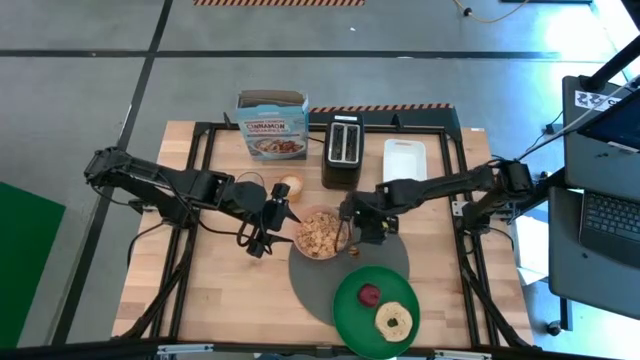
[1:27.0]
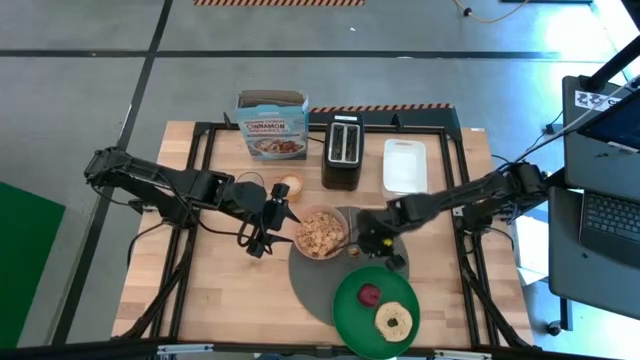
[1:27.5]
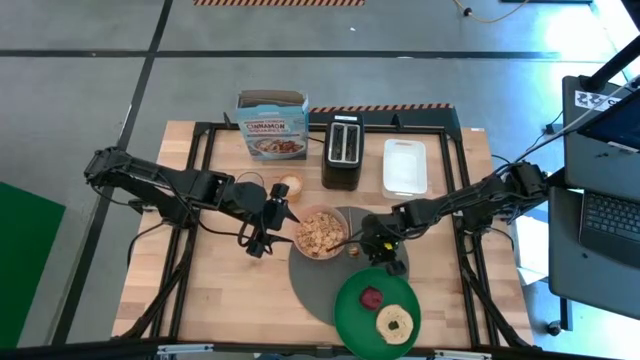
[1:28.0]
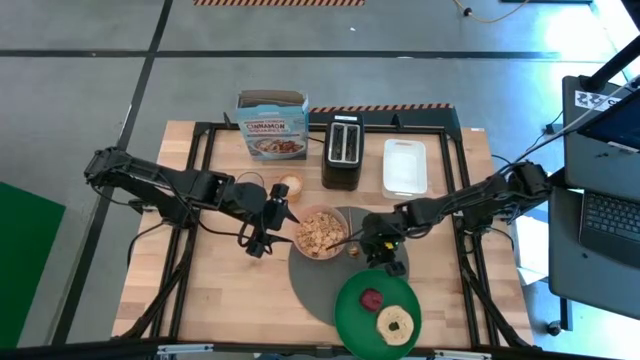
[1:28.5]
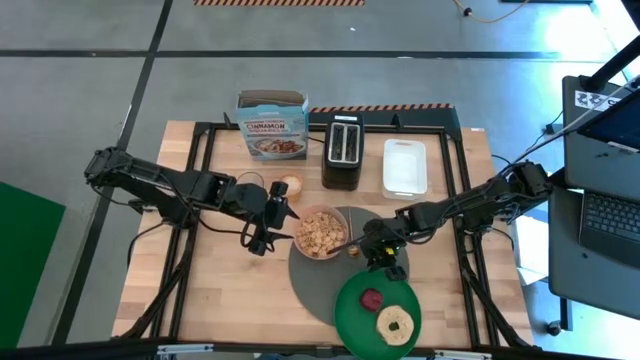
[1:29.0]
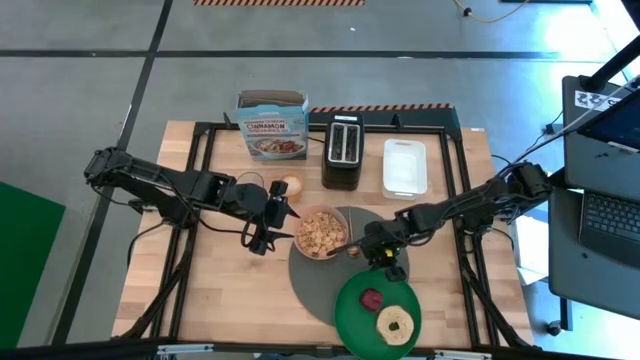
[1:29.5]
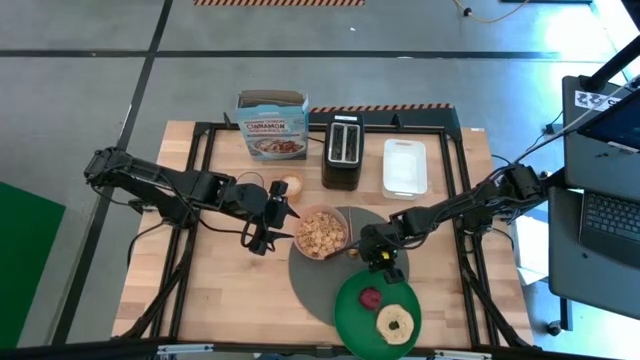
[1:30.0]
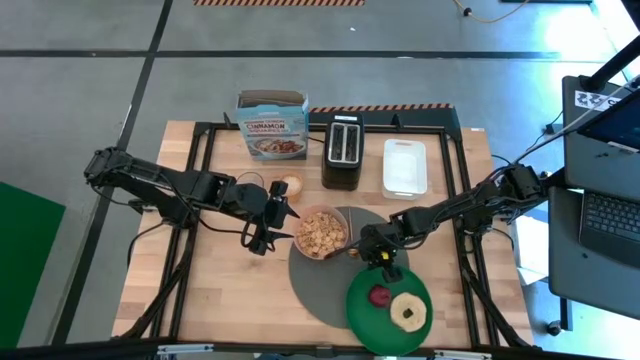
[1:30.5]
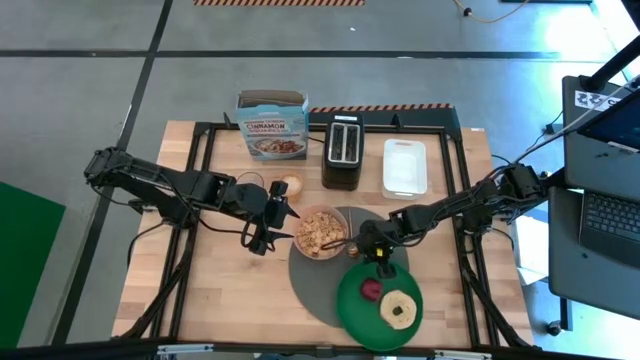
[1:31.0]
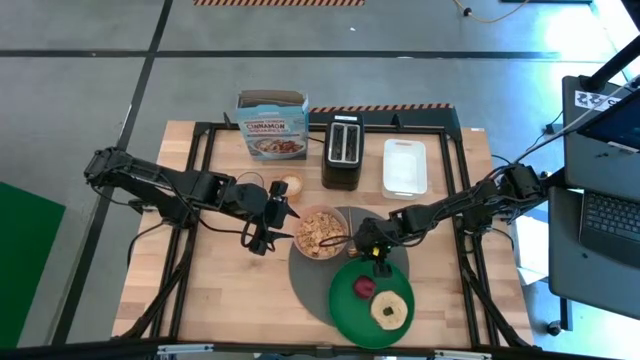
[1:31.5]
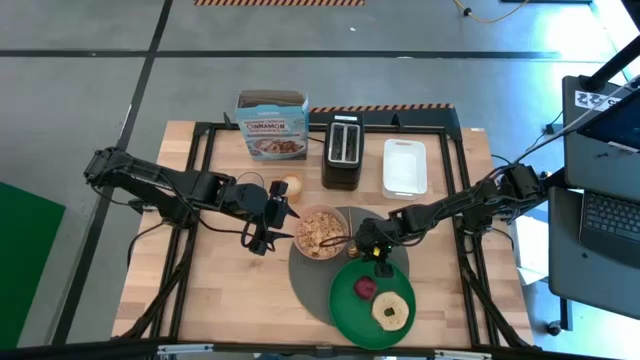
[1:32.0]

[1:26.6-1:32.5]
Task: Arrange a breakfast setting
Adjust the green plate on the gray table mat

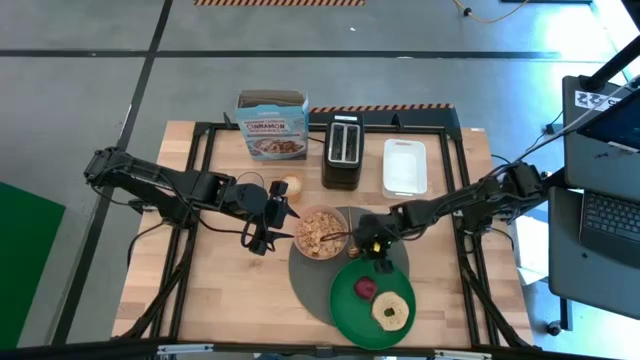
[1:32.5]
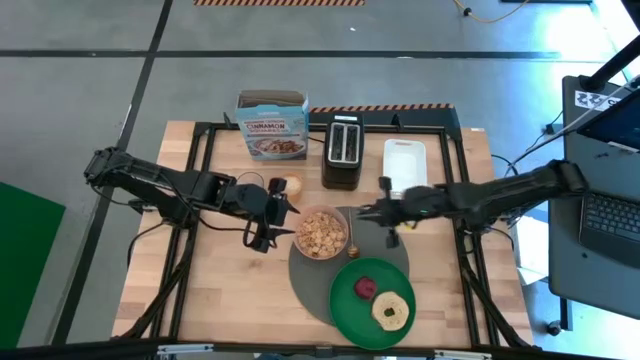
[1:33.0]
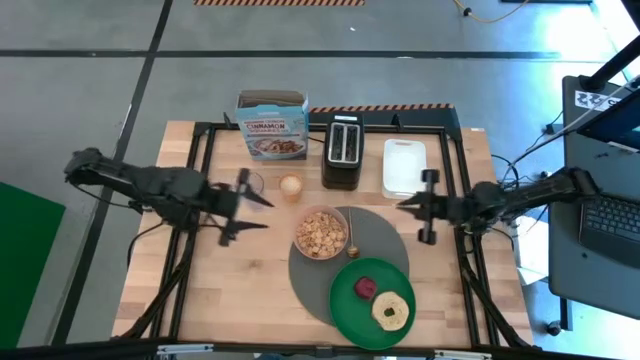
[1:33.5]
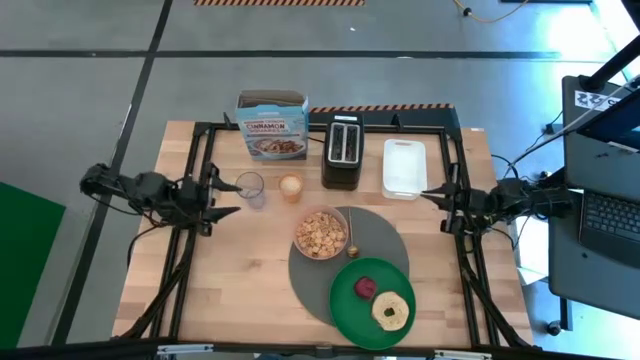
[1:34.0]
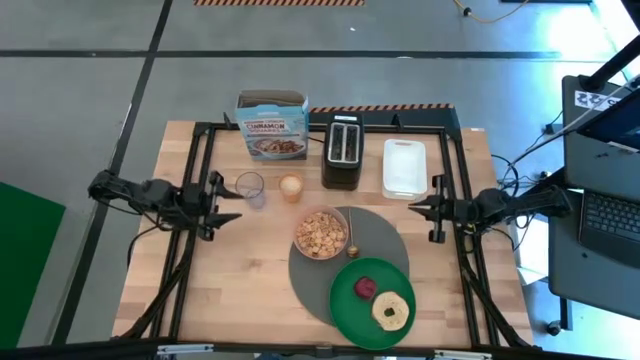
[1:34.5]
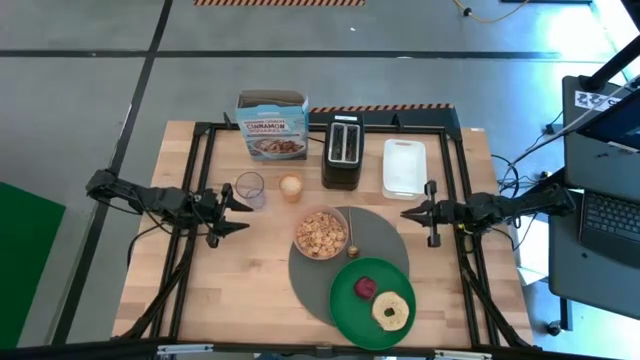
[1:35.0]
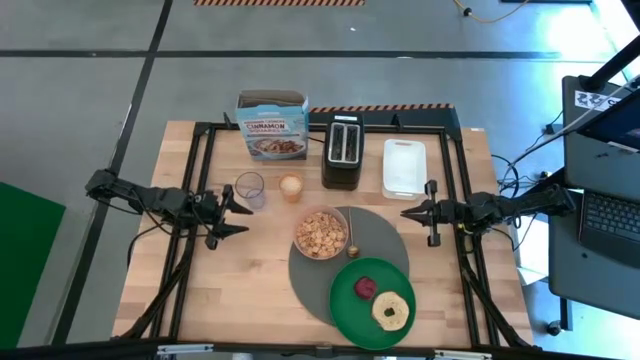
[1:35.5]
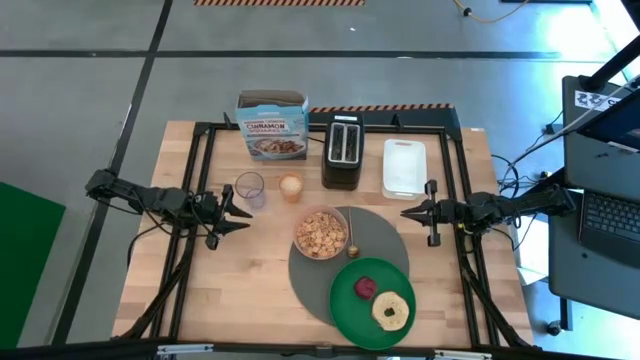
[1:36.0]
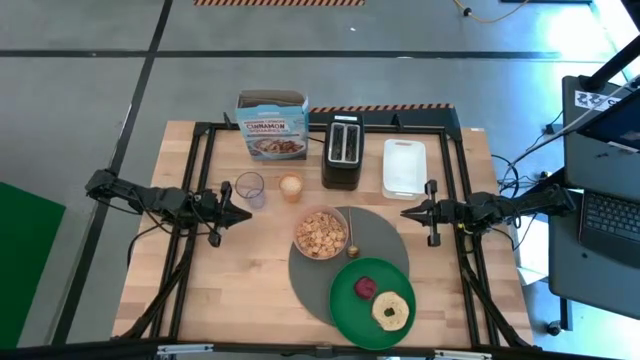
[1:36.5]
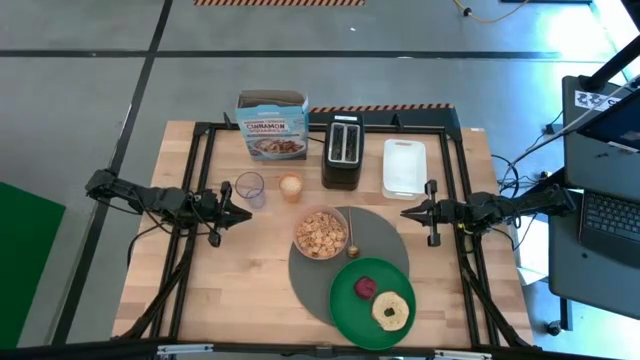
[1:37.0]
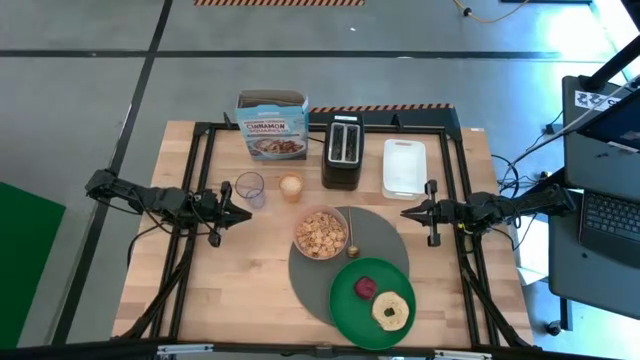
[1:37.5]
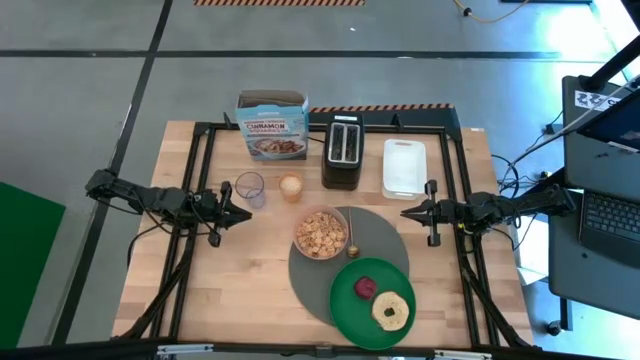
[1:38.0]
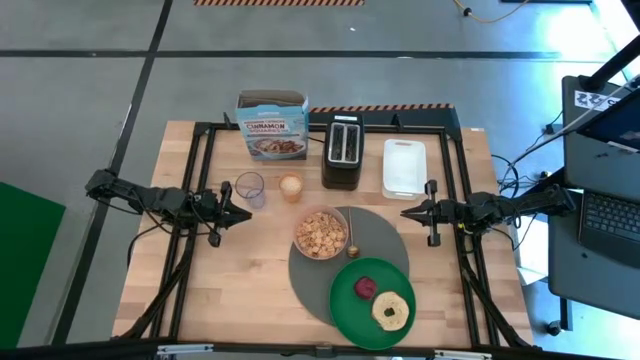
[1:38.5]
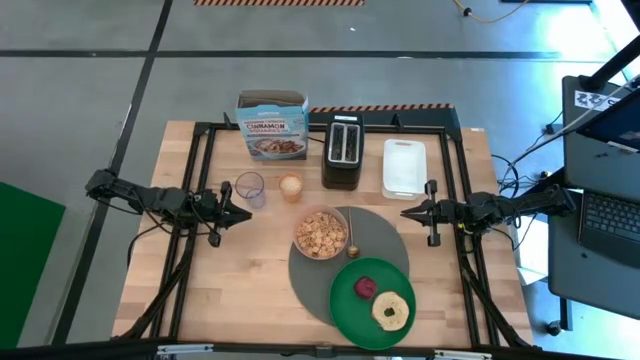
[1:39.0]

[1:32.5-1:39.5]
Return to Home Position

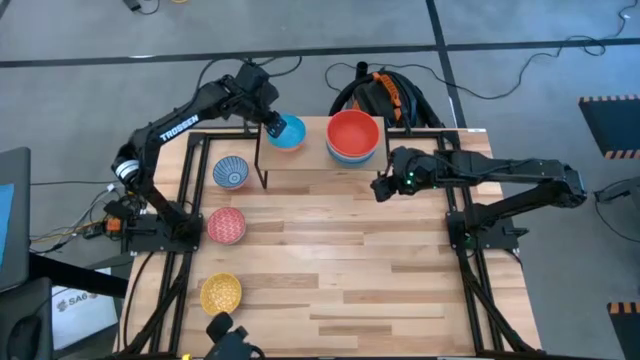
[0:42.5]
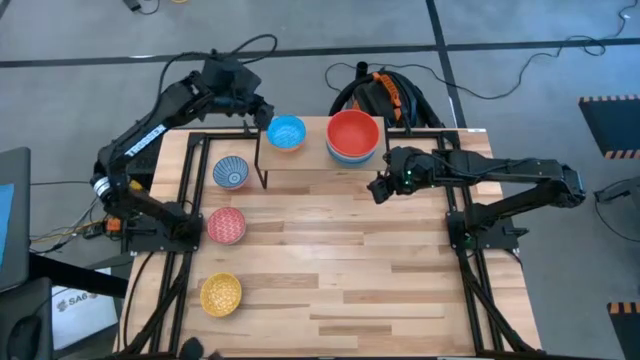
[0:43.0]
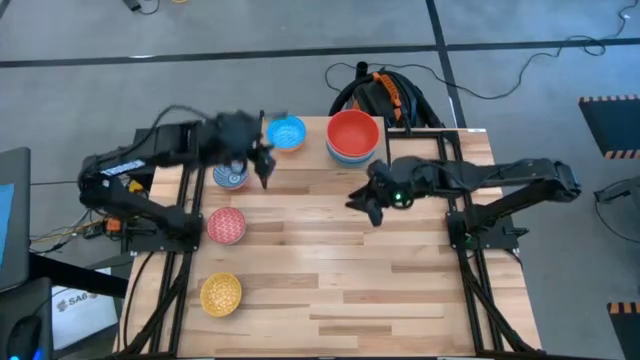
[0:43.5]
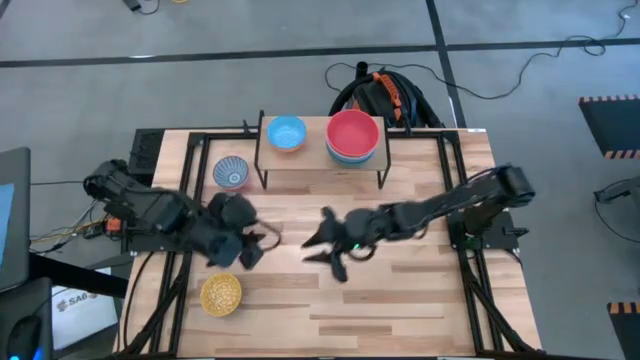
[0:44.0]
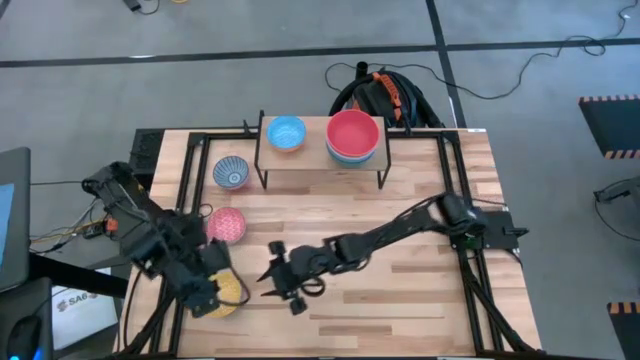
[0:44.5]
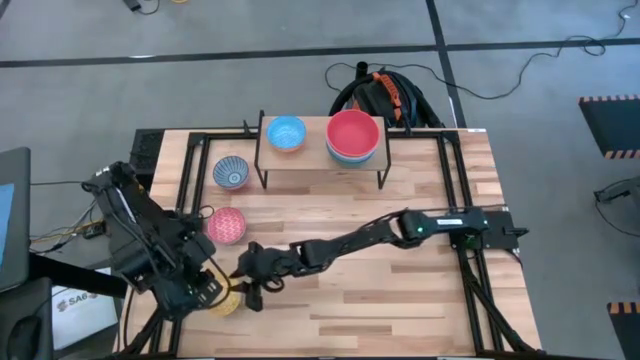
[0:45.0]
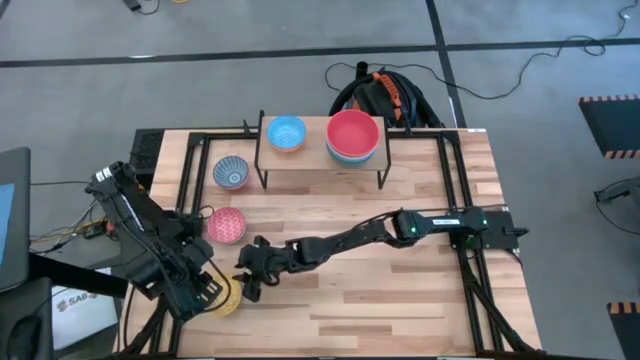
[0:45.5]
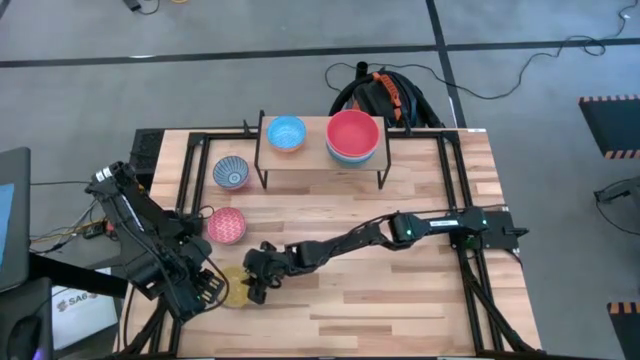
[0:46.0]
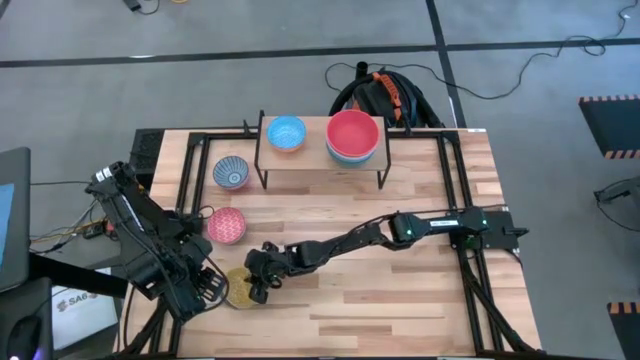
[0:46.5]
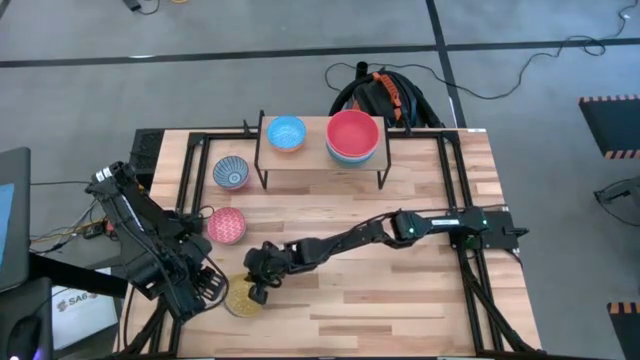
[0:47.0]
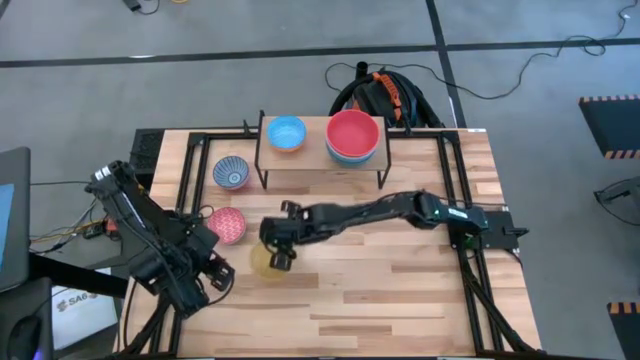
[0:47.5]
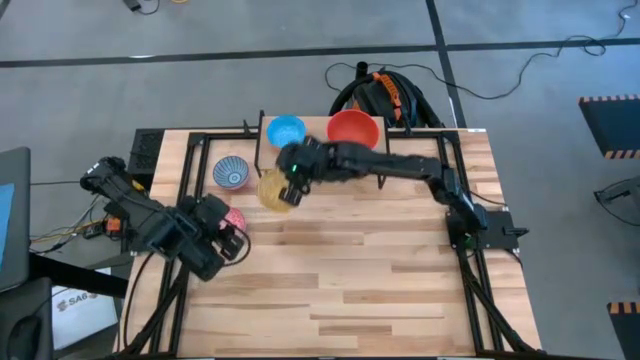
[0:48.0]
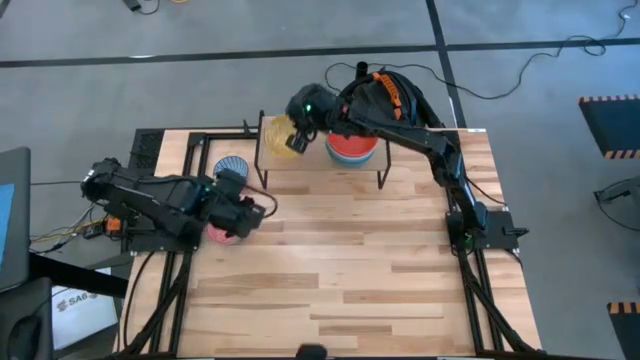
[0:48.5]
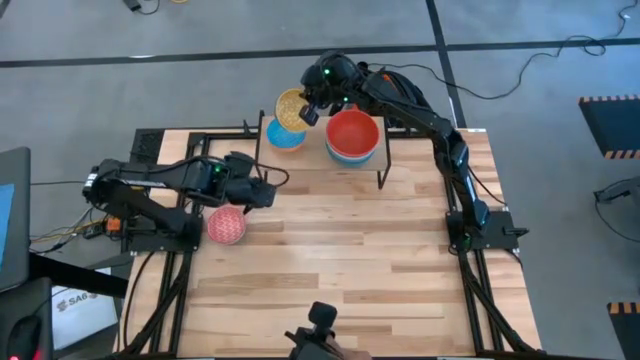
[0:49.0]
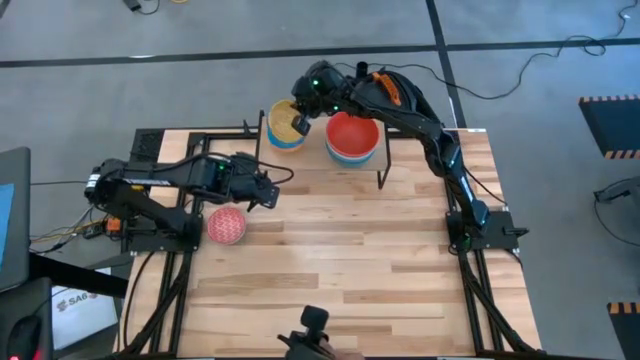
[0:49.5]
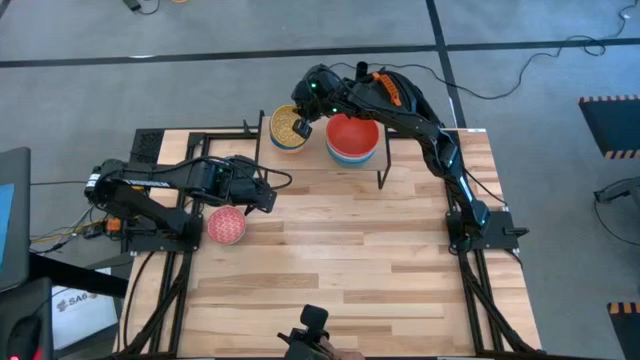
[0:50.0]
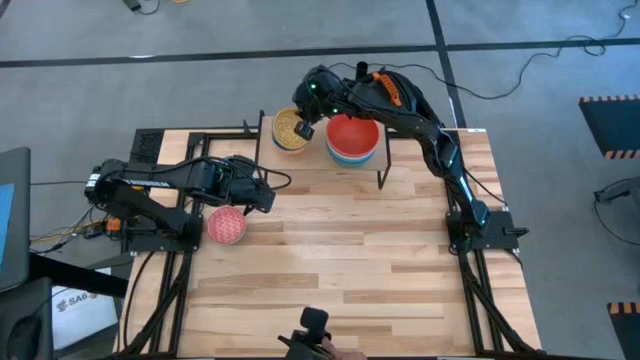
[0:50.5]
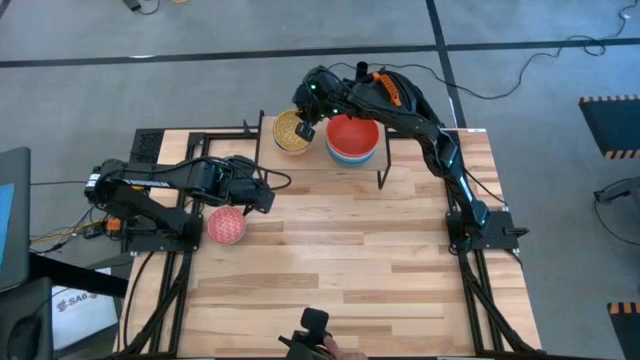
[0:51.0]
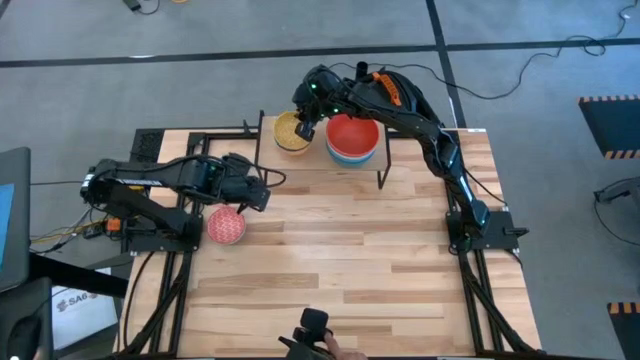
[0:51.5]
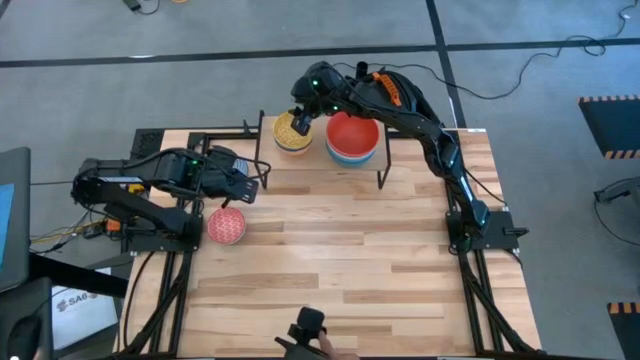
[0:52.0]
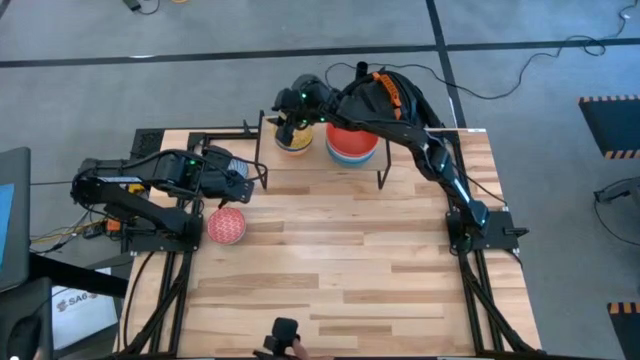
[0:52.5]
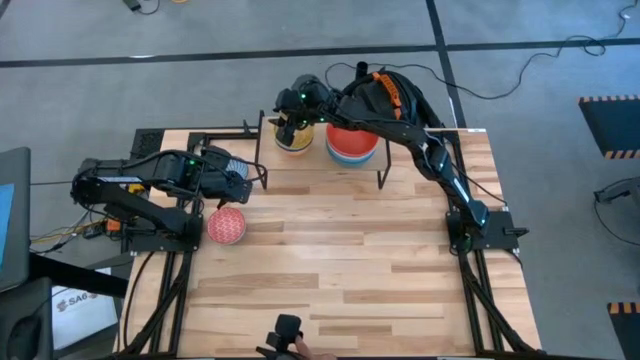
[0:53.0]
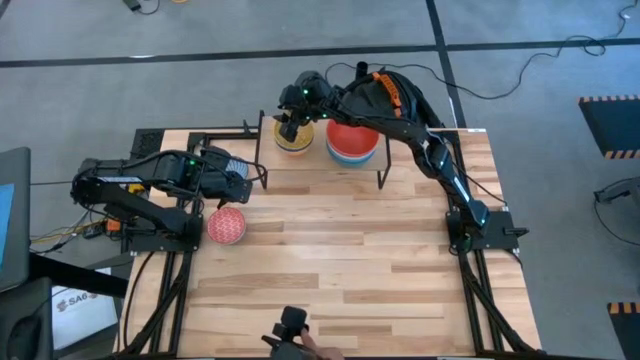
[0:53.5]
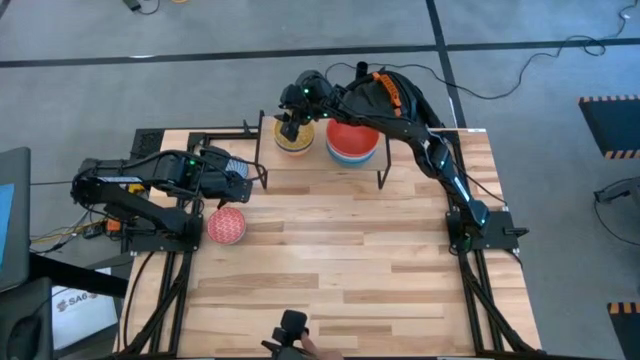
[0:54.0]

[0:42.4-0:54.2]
Task: Place and stack bowls onto a shelf
Stack the yellow patterned bowl on top of the light blue patterned bowl on the shelf
